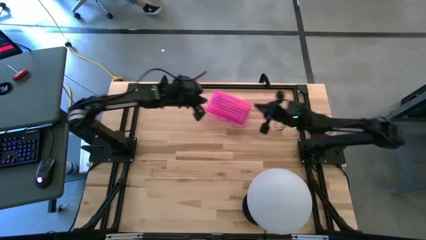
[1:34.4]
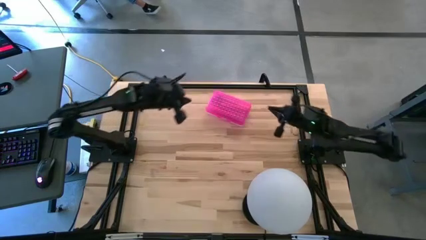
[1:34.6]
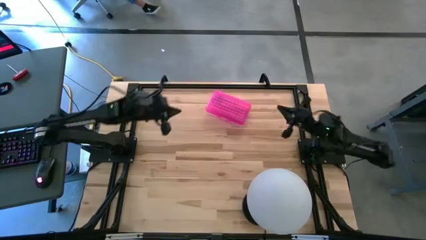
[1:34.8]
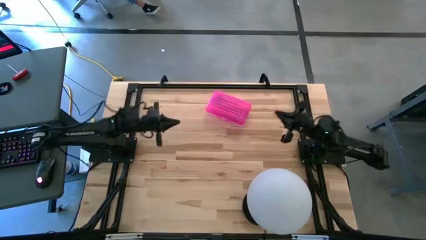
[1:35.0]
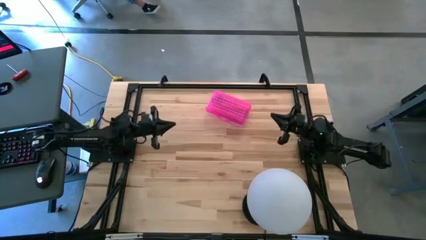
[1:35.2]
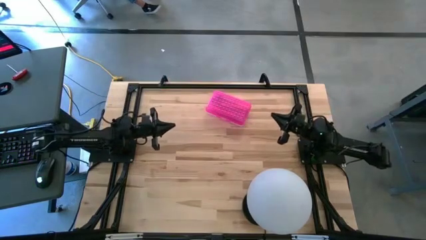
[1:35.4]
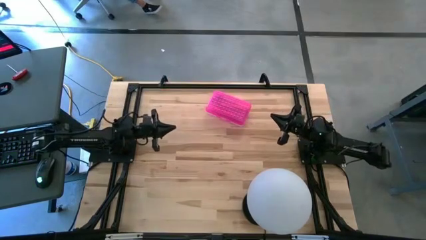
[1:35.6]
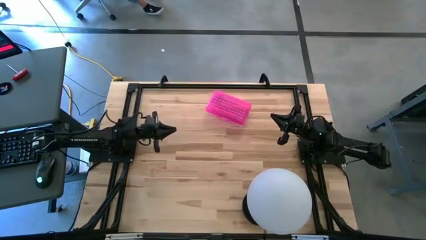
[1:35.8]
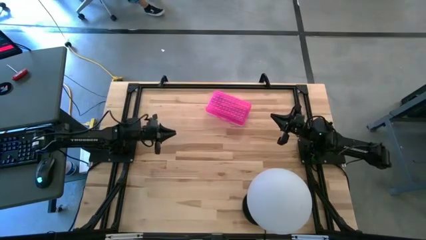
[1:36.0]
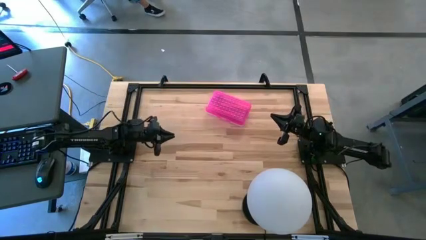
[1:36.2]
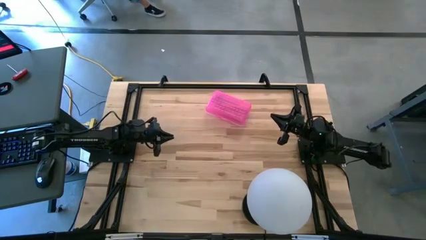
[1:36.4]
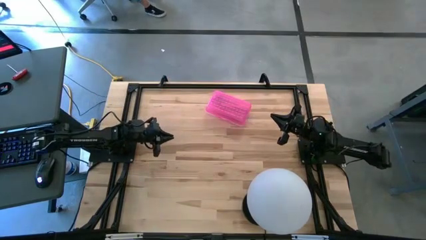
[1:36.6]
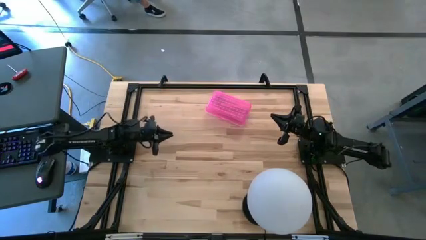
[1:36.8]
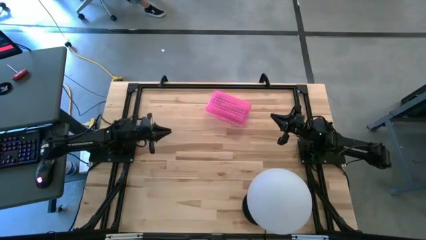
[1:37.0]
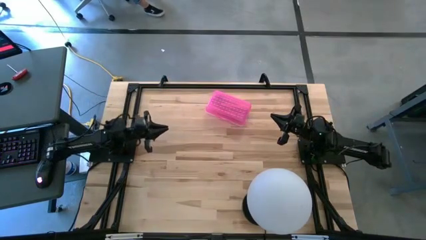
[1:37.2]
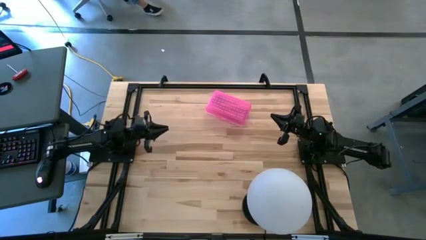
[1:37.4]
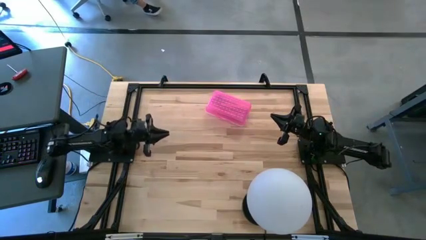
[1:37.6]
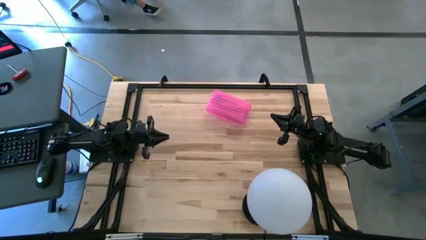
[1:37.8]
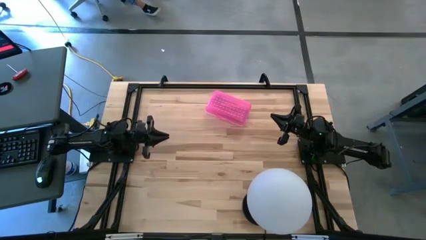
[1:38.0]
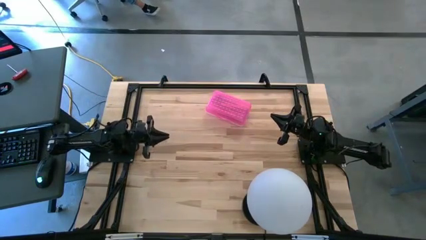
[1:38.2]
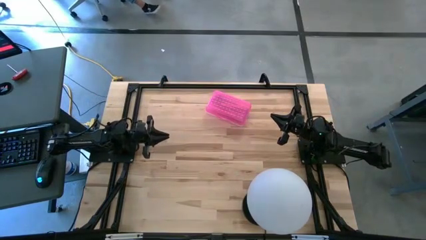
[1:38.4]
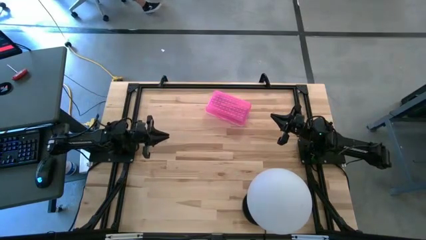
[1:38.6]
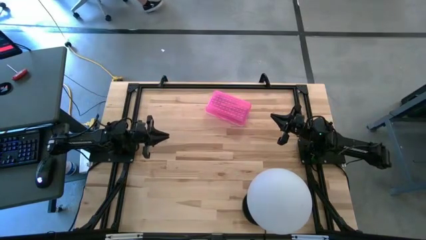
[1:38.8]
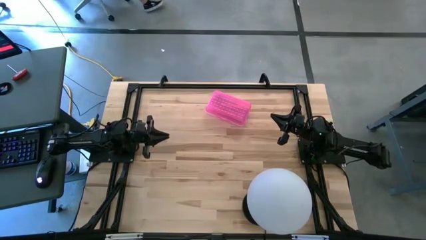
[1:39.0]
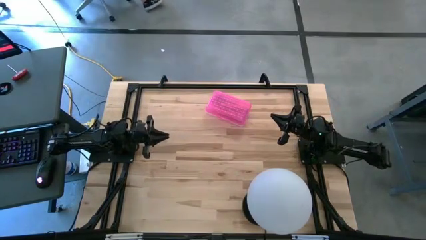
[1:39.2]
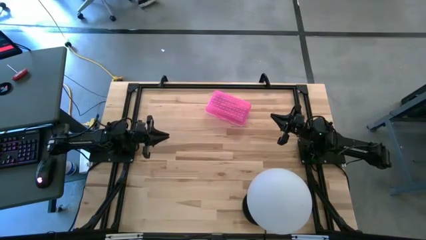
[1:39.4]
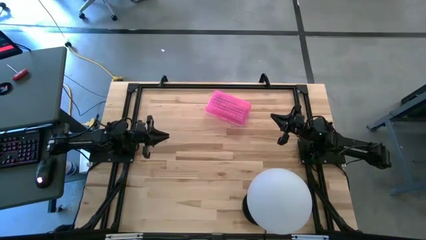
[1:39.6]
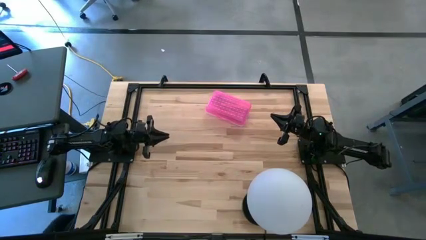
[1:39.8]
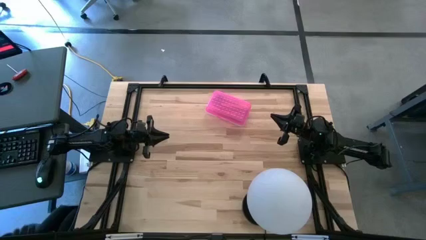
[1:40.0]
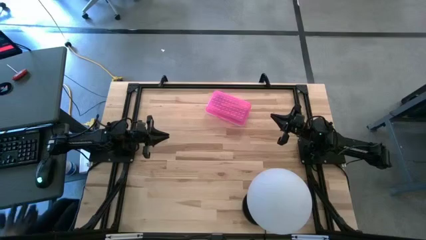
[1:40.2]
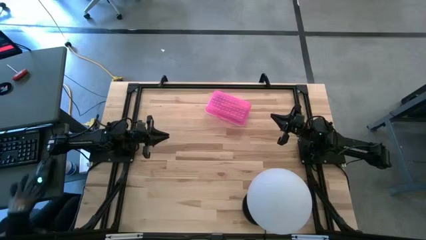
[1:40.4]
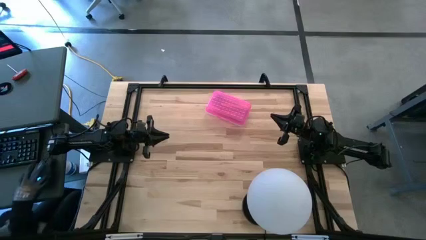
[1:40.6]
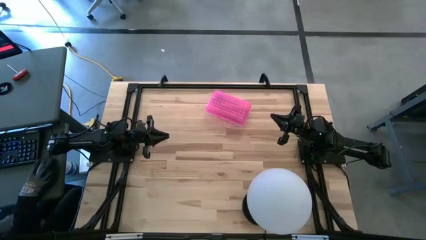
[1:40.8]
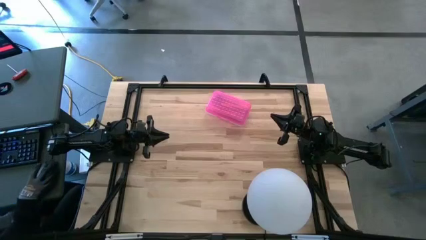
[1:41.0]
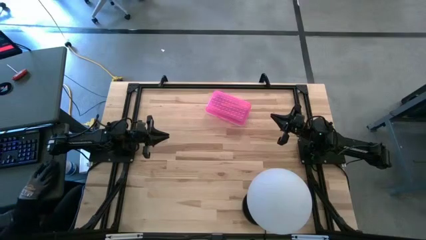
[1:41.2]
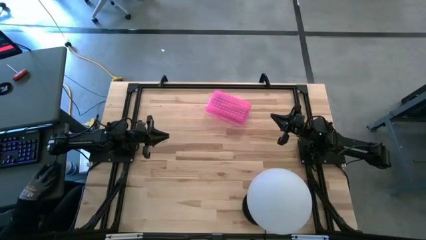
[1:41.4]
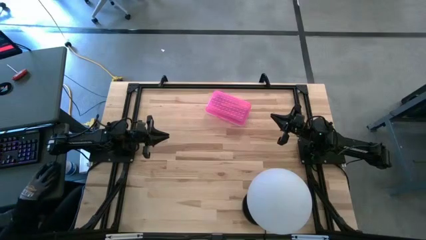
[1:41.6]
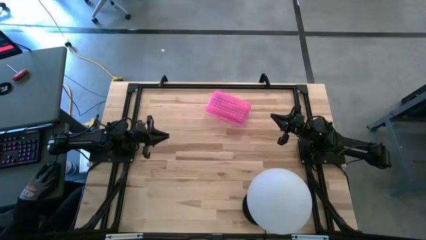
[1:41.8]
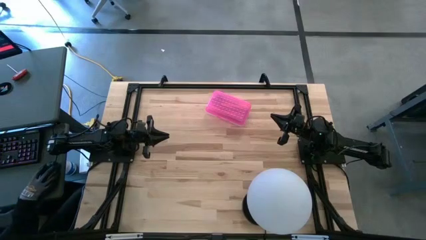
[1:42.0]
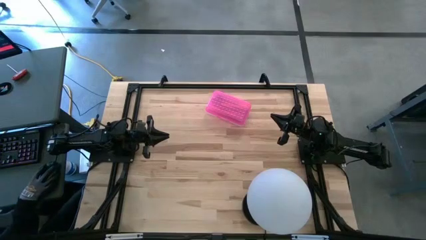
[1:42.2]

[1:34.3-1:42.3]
Task: Pick & place school supplies into a supply box
Return to Home Position

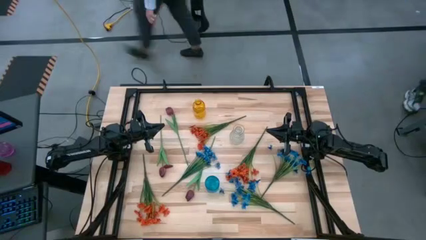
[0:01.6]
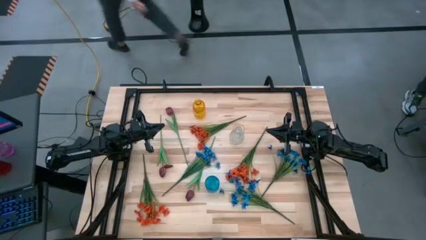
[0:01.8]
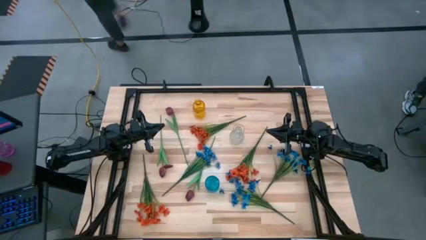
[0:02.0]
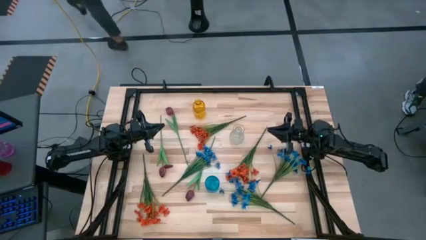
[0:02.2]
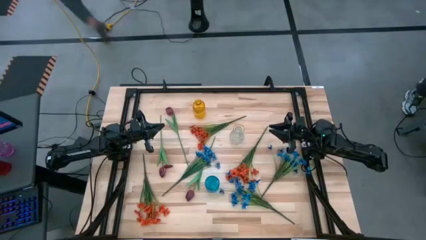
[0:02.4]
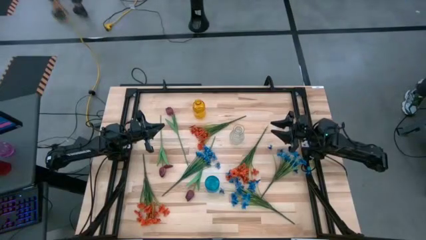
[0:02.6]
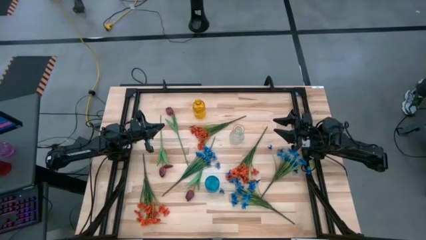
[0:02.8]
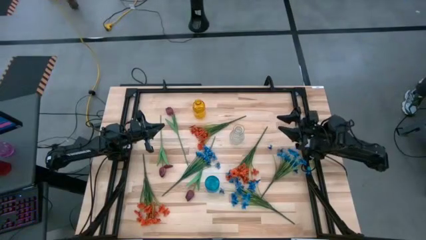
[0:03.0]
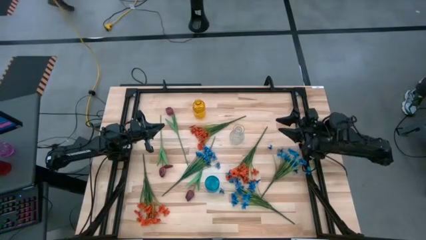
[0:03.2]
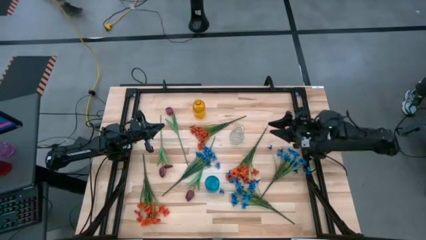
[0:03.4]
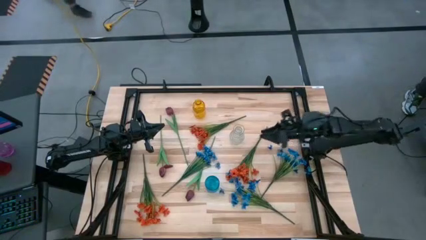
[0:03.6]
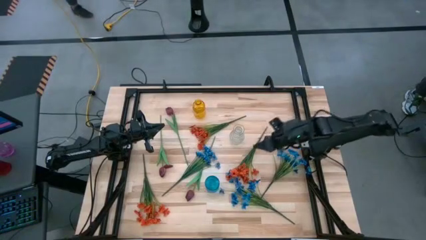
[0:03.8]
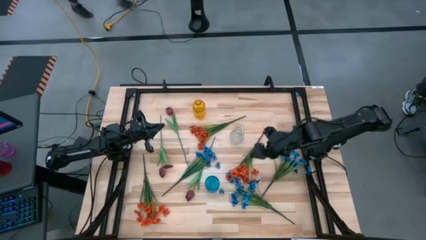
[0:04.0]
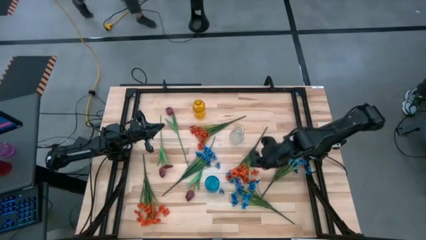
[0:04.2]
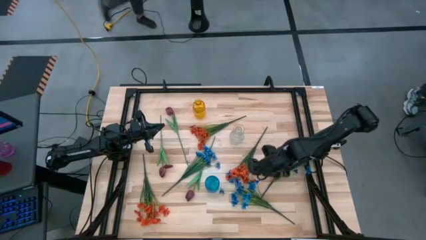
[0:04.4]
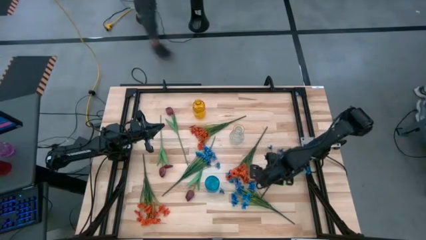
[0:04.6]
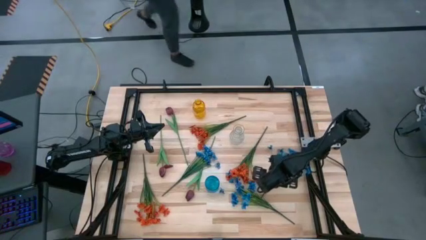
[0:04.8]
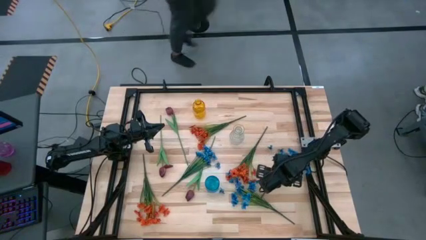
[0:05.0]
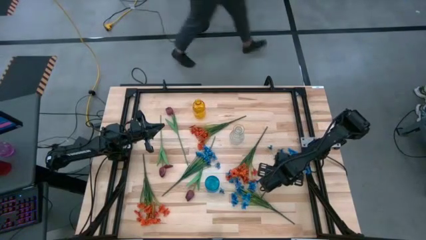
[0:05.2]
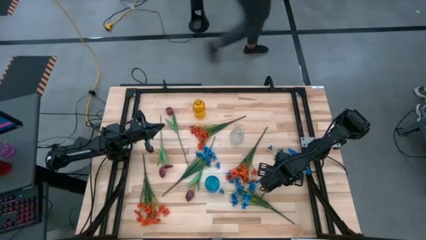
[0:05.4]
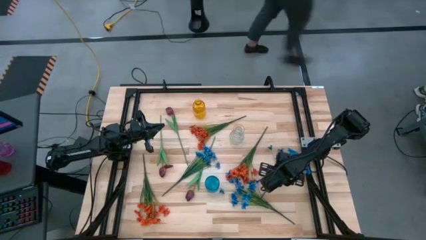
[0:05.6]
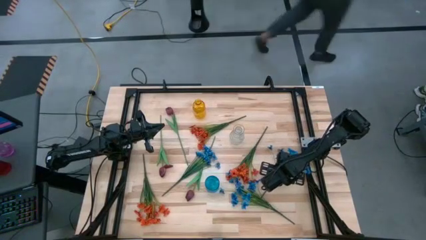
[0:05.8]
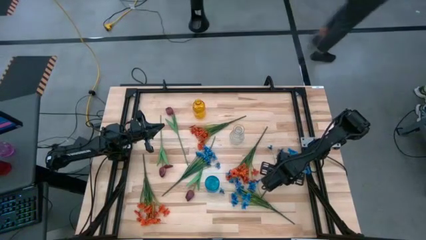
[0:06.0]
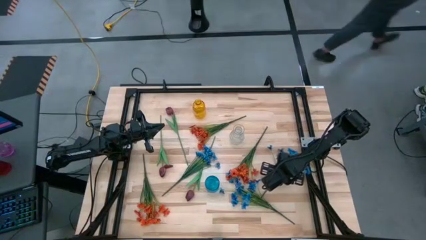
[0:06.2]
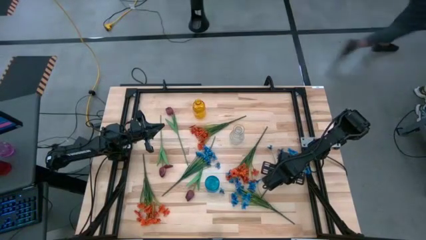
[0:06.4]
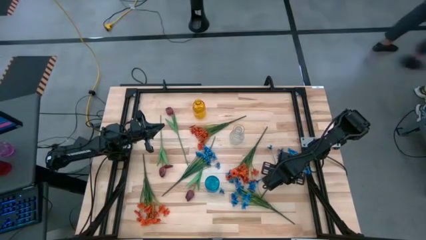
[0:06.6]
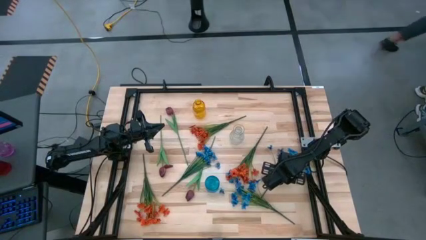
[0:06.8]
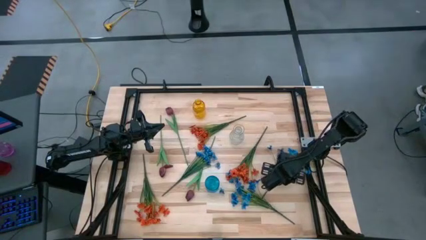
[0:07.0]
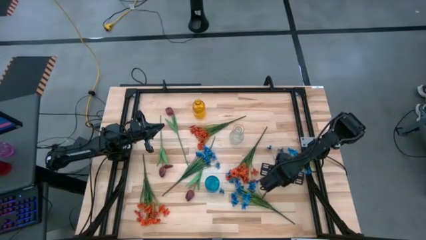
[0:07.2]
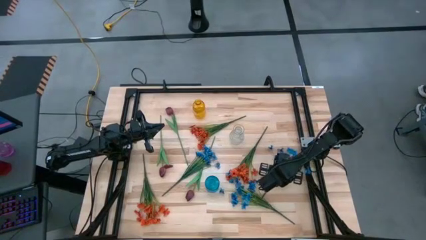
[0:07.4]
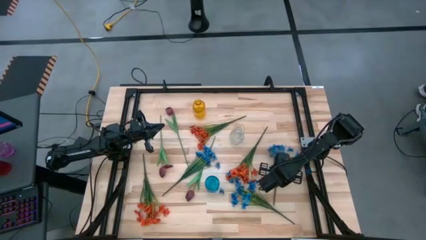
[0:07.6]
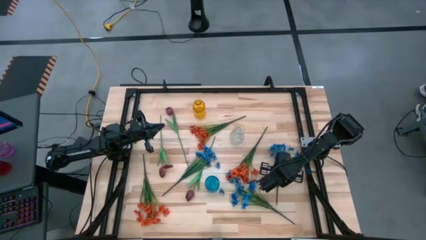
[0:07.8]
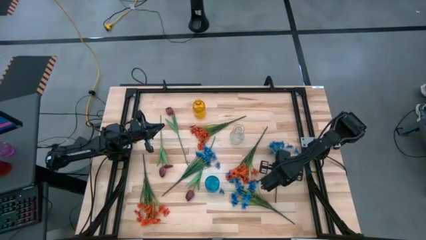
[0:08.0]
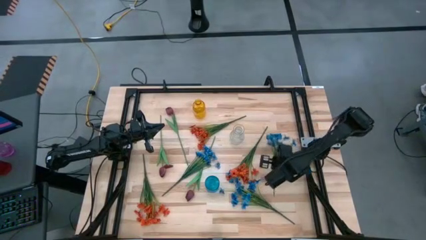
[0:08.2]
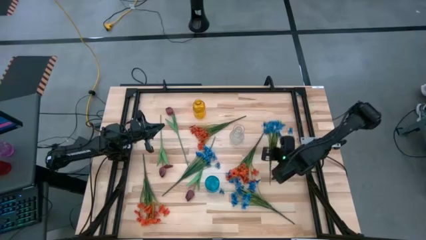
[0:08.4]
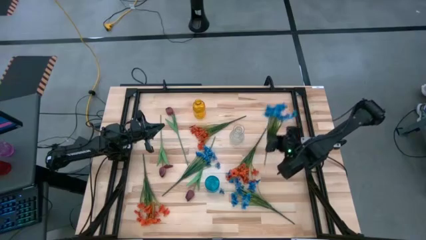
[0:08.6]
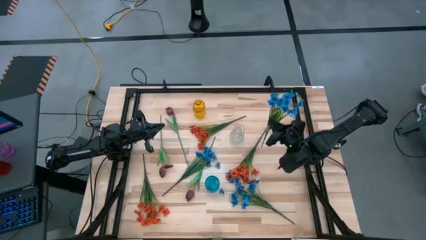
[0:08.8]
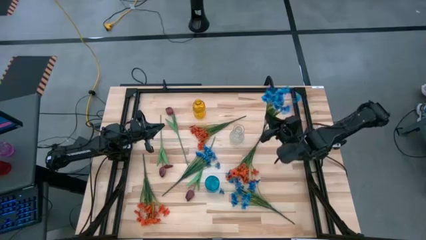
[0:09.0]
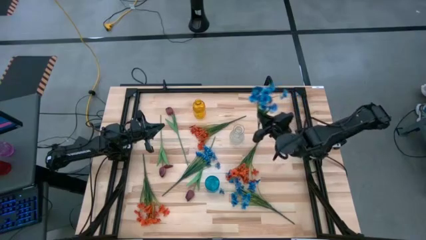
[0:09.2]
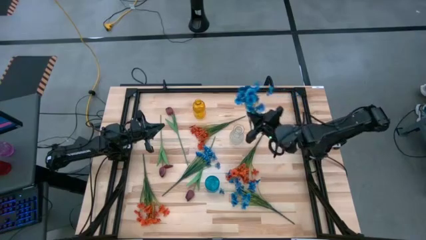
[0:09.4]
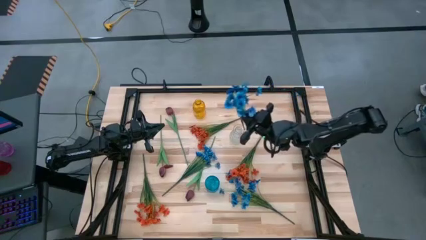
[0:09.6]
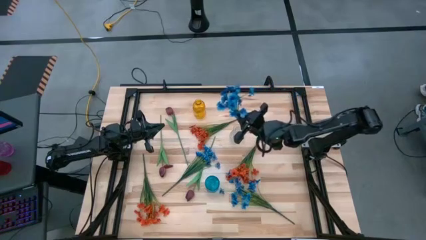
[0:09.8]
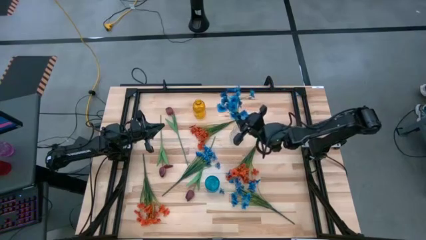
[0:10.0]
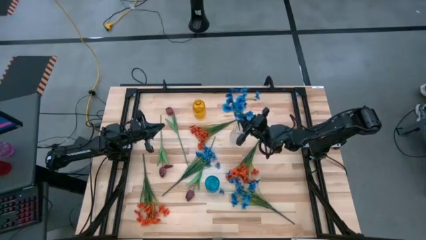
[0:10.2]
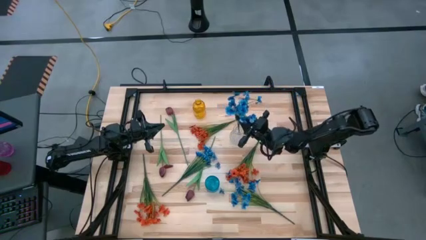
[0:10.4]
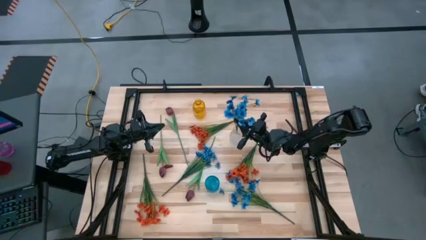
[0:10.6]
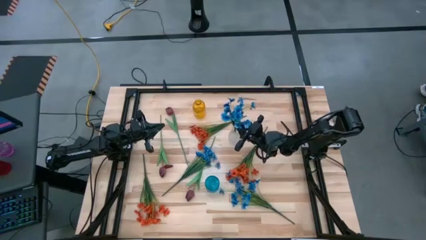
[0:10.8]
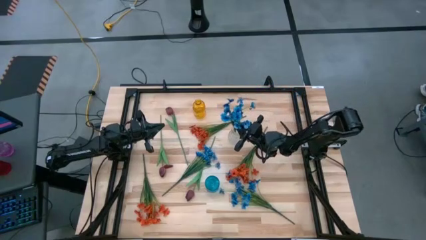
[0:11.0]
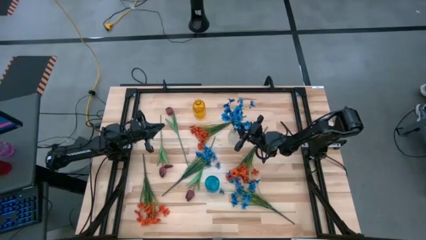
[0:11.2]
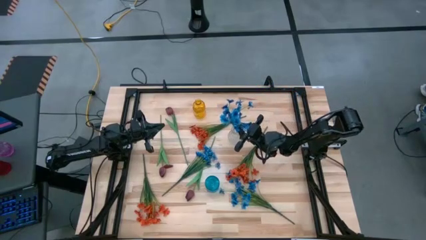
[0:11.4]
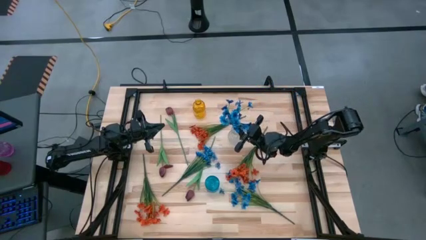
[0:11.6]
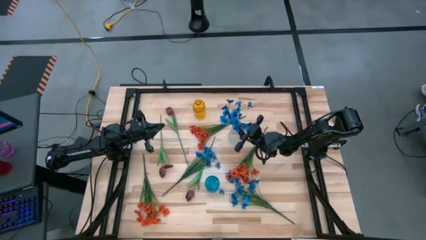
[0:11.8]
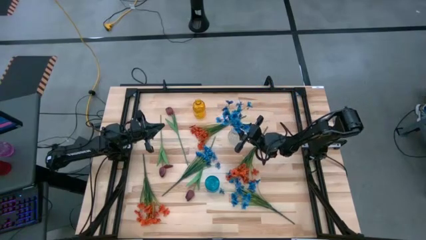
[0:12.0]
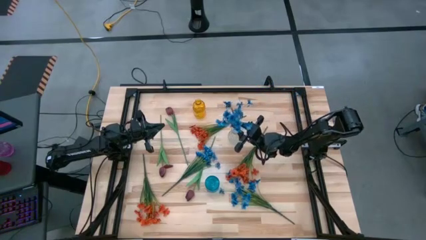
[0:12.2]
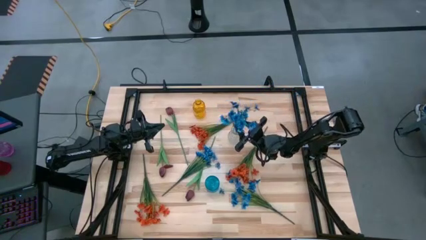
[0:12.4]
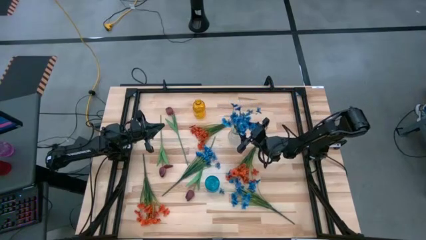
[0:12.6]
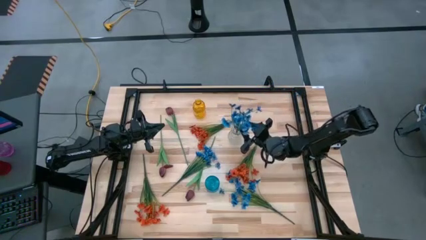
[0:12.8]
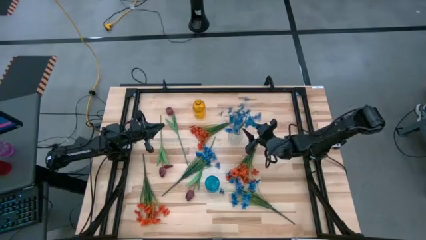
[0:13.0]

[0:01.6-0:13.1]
Task: Sort flowers into vase by color
Put the right blue flowers into the transparent vase
